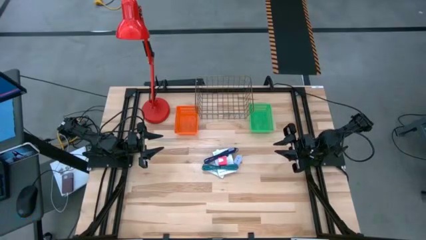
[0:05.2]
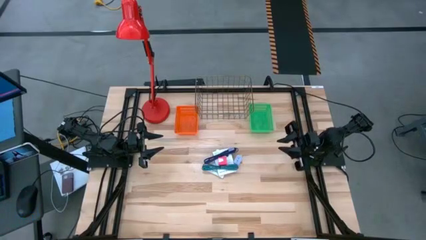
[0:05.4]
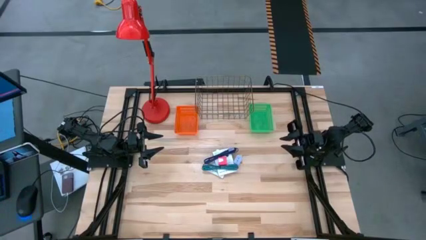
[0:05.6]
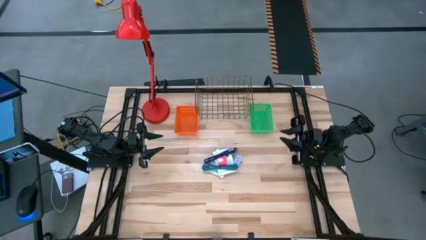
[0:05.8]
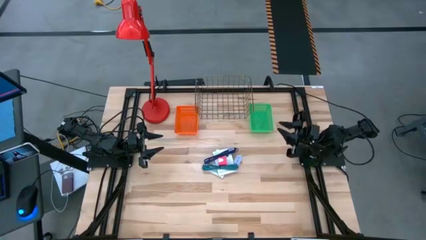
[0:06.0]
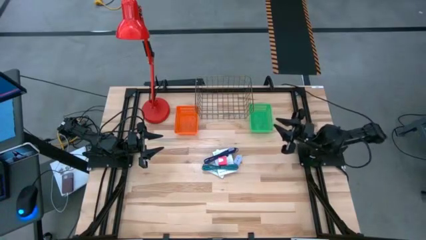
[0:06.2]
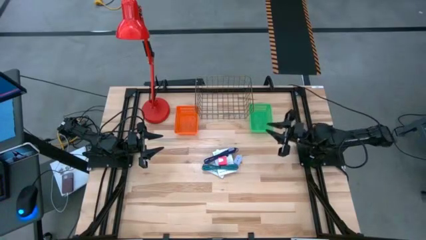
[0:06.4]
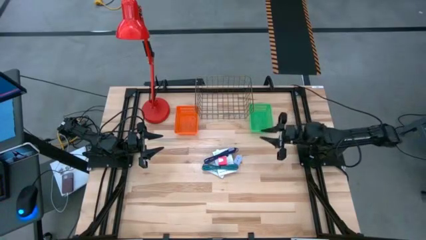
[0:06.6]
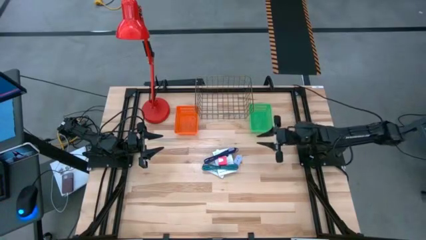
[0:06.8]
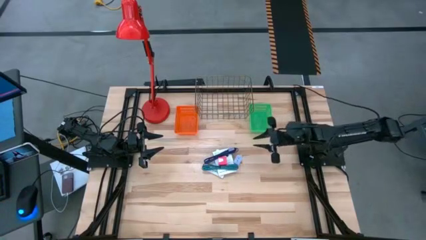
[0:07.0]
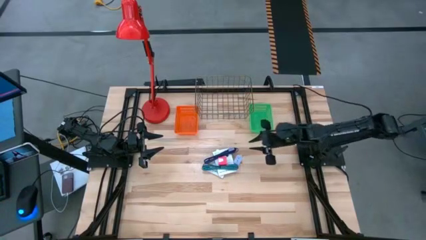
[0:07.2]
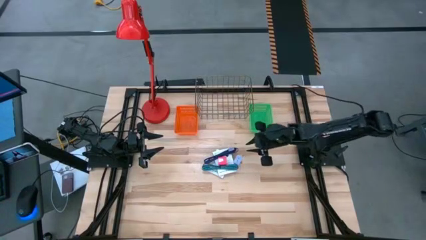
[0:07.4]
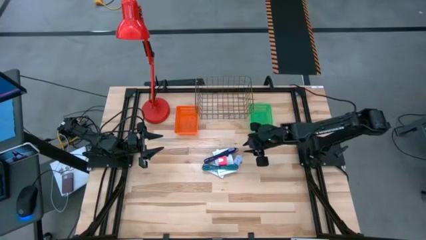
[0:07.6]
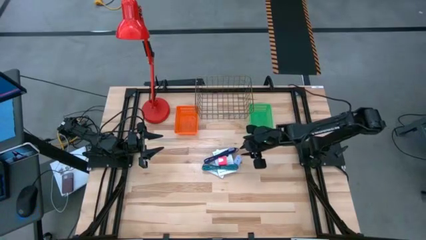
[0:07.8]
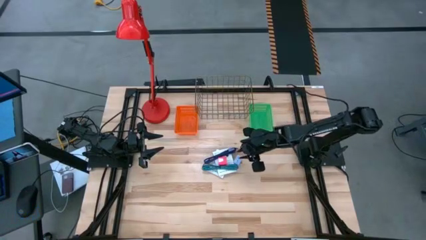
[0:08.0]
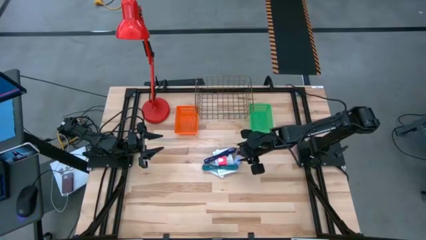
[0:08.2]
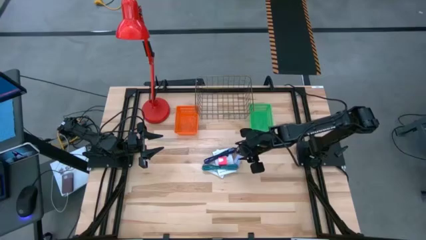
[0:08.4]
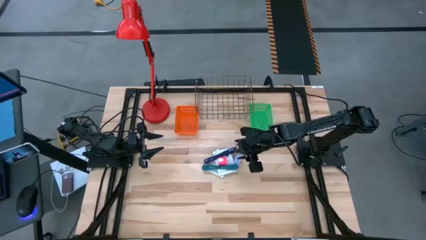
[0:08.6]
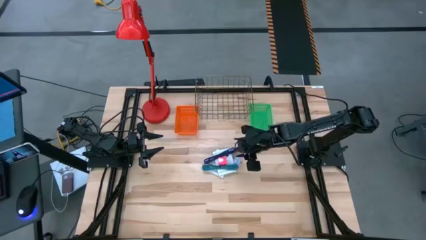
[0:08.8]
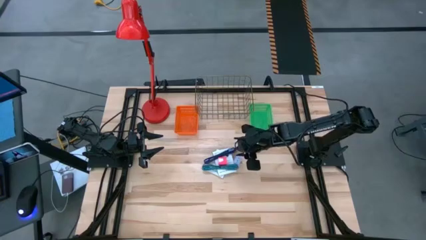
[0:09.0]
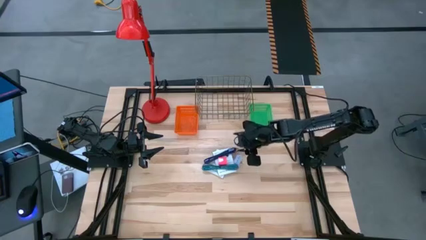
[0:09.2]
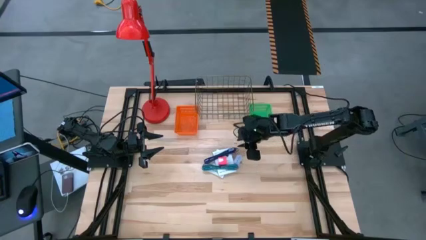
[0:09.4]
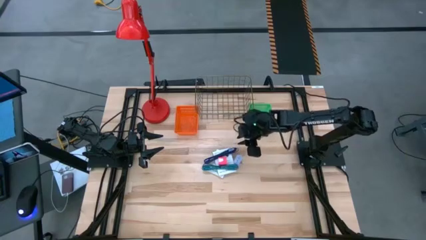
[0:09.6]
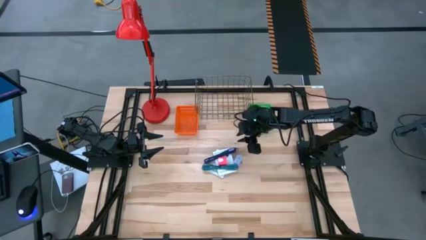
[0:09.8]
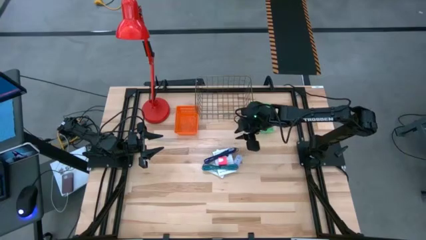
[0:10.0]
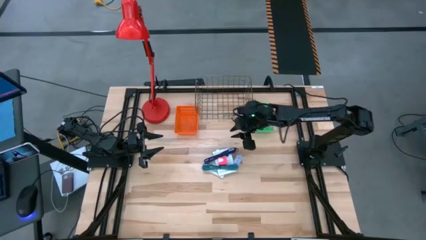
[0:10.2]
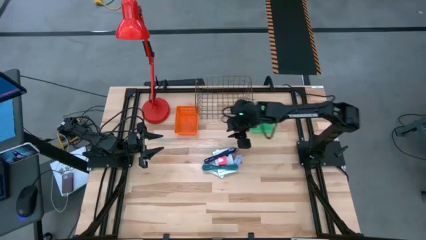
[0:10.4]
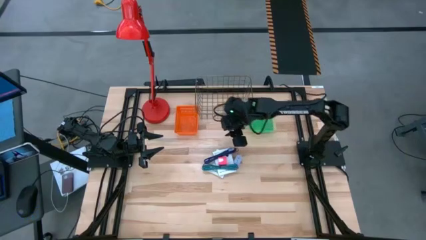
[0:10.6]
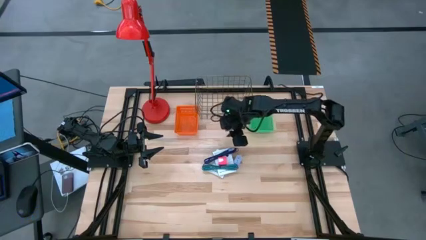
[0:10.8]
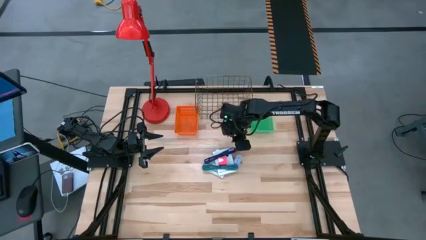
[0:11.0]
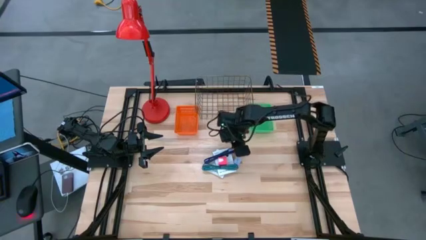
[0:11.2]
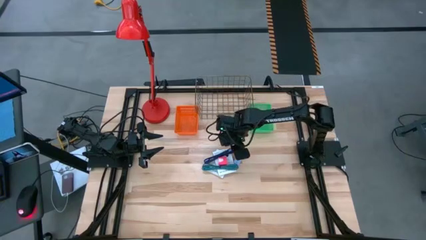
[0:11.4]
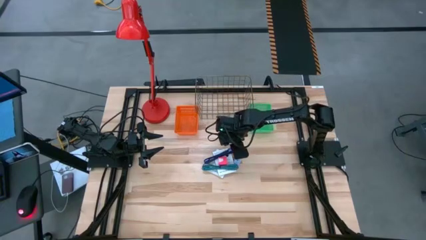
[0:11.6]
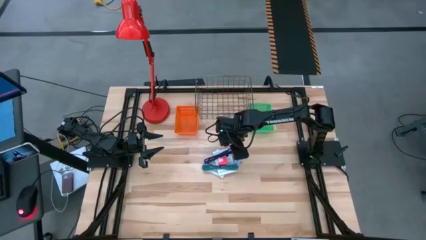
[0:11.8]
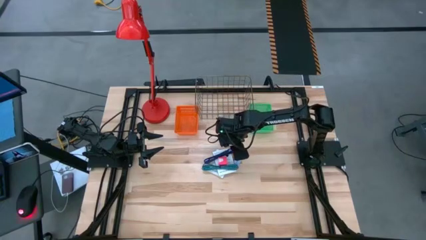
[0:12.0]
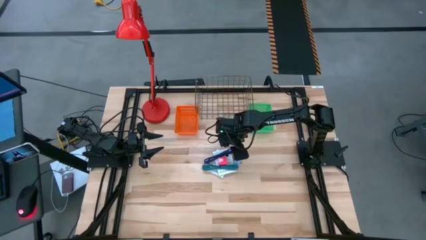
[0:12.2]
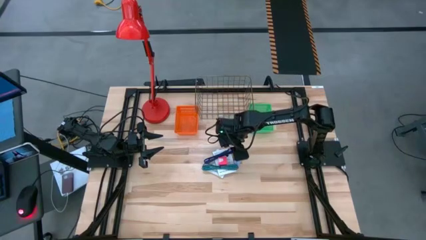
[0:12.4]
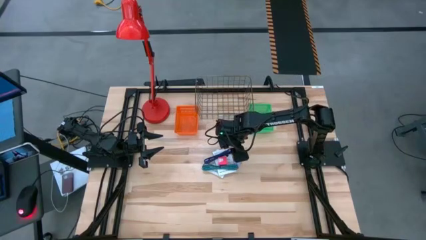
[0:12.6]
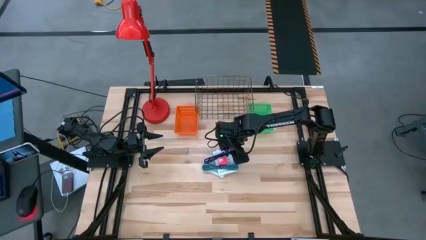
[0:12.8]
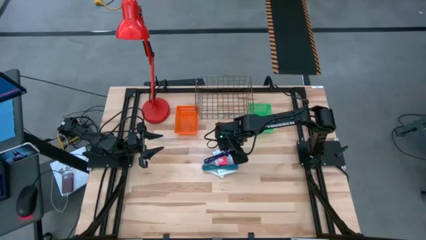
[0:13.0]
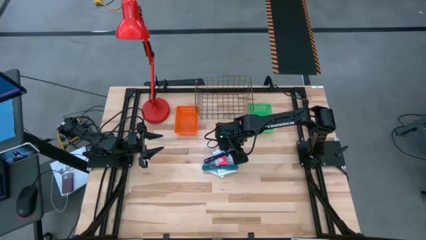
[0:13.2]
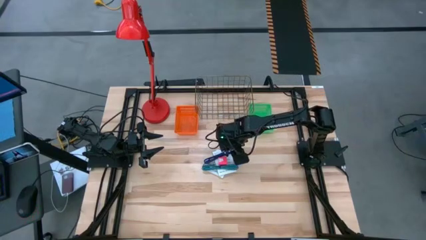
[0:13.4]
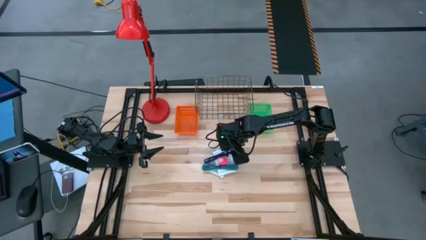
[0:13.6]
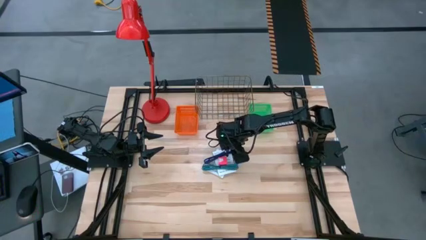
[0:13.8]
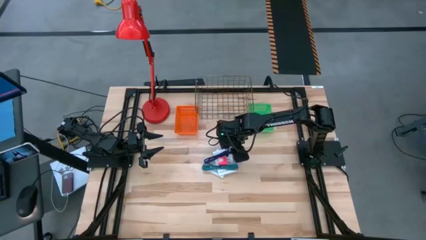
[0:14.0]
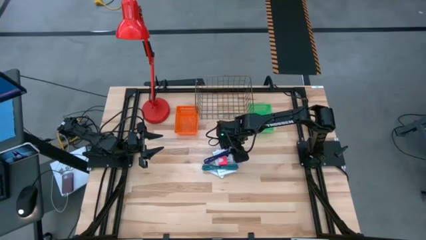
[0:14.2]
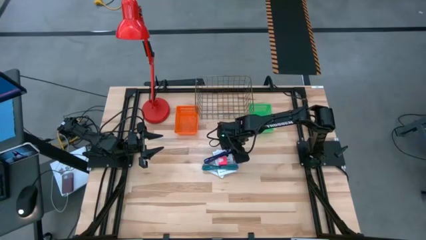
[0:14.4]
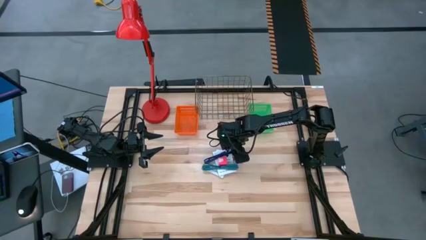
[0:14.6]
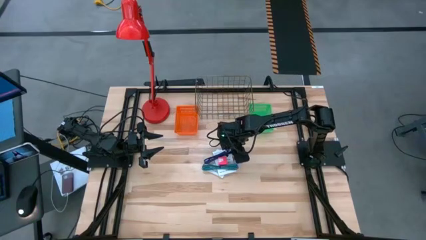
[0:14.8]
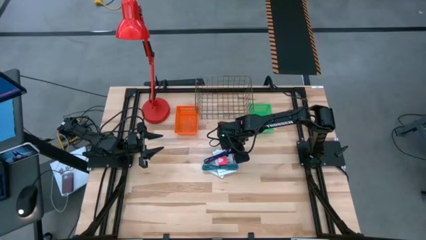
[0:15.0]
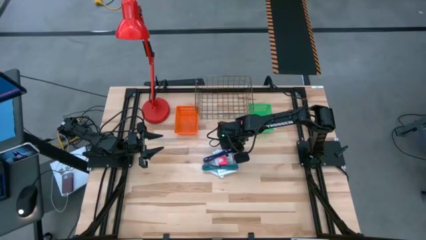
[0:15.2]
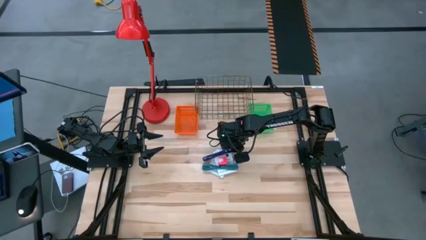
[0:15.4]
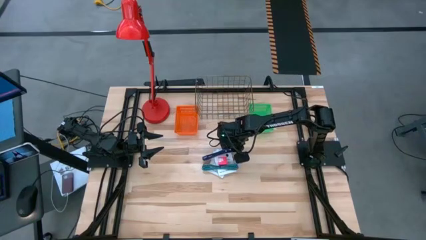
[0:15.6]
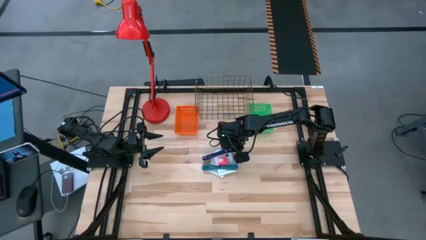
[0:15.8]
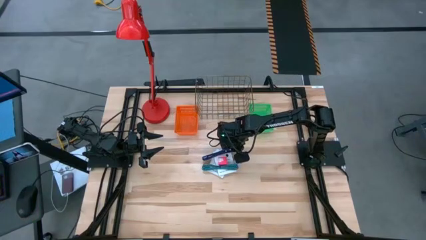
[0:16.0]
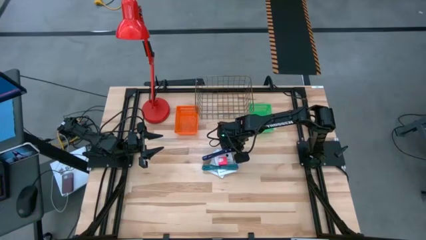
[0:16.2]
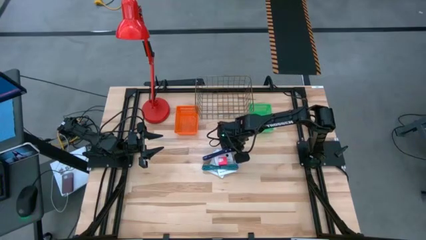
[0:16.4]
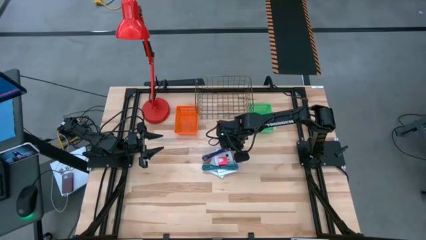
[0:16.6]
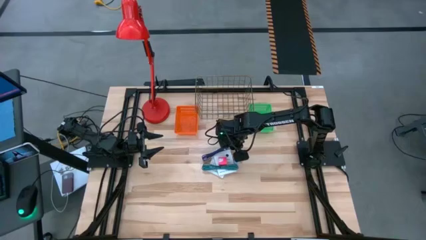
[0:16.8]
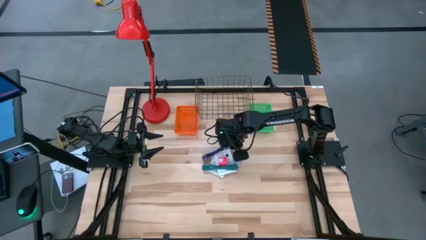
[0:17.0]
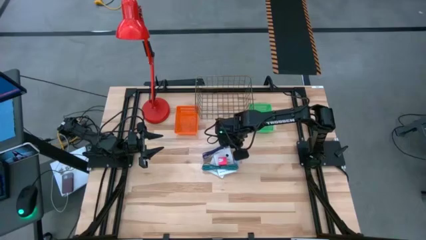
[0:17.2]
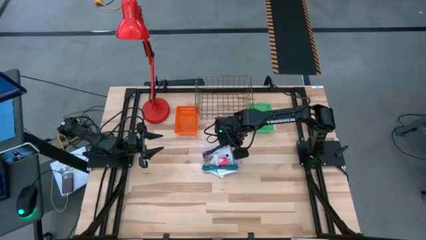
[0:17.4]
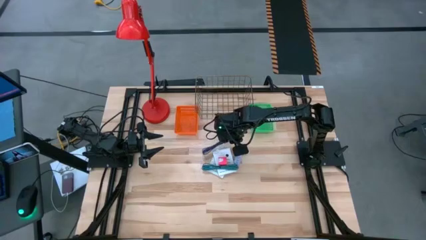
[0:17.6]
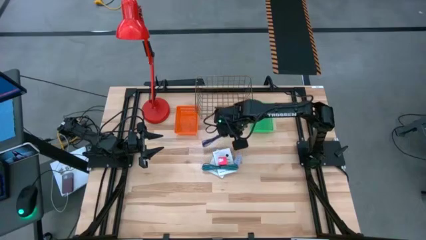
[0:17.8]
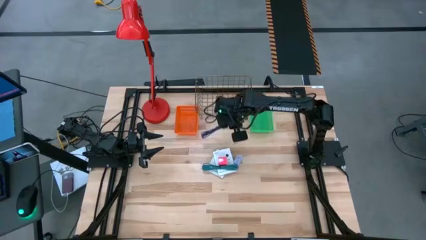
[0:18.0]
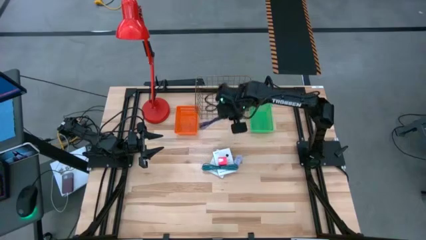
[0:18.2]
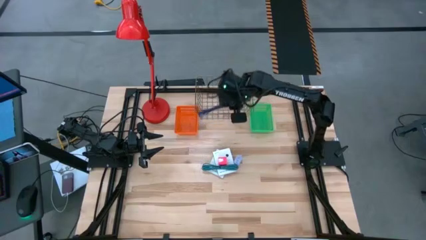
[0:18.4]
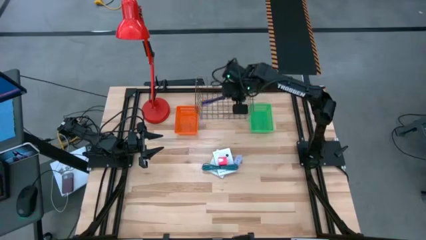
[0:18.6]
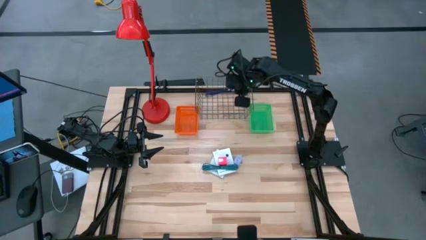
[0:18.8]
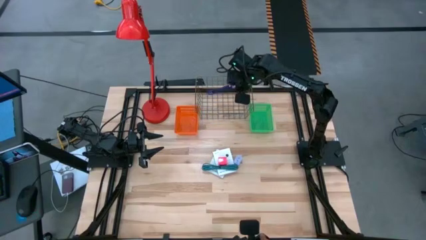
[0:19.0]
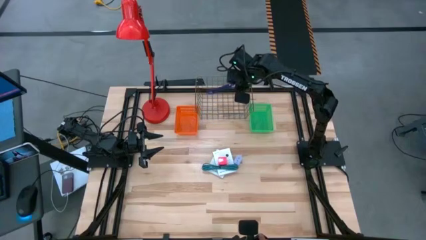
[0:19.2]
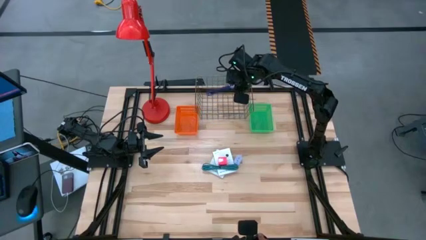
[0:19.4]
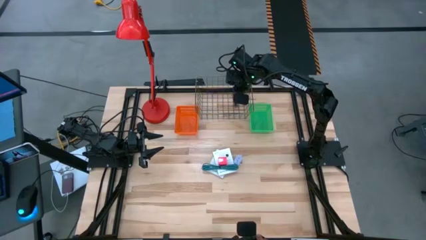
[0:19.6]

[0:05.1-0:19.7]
Task: Pick and place items into bin
Put the violet charger cable into the wire basket
